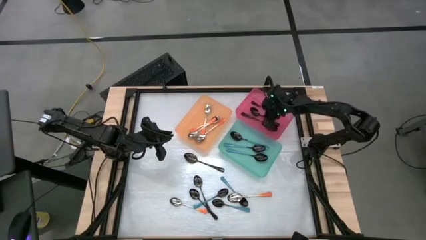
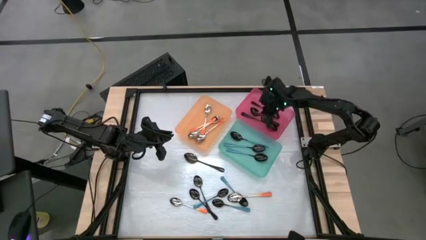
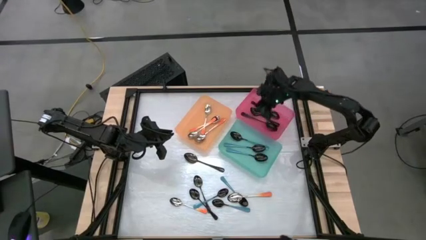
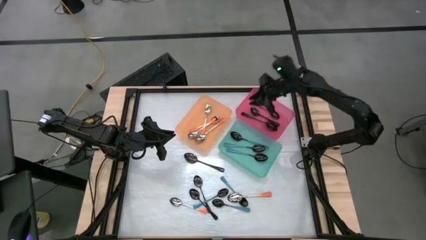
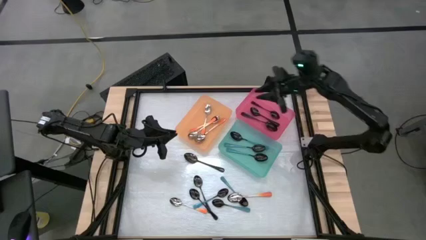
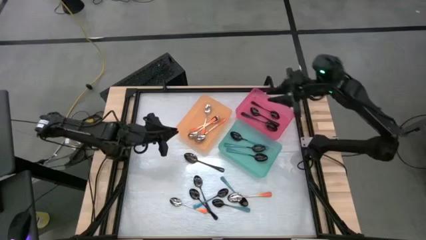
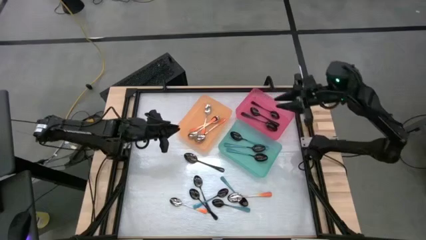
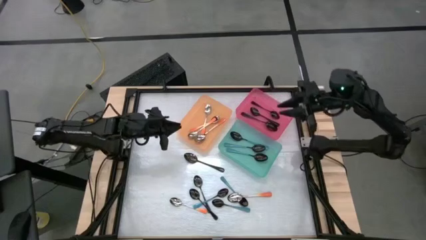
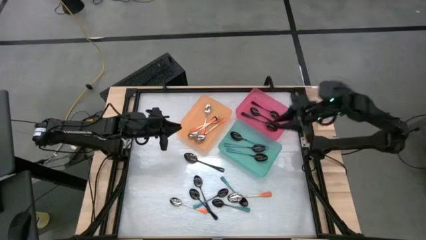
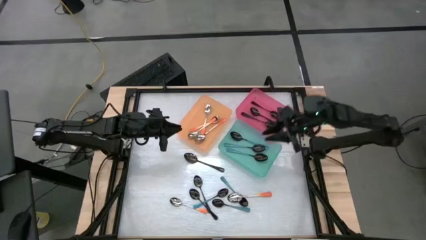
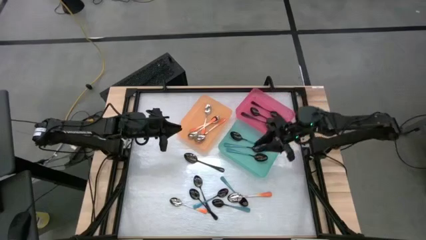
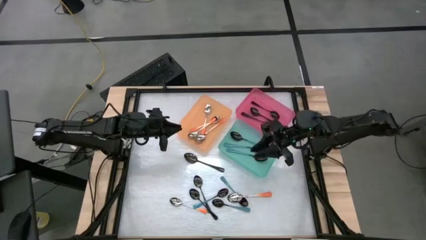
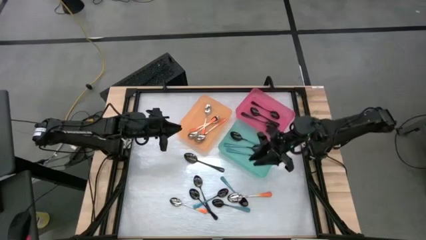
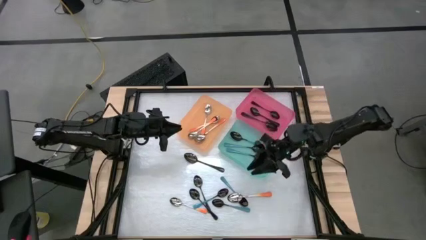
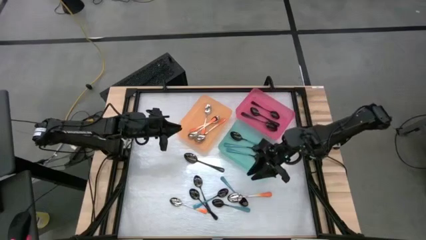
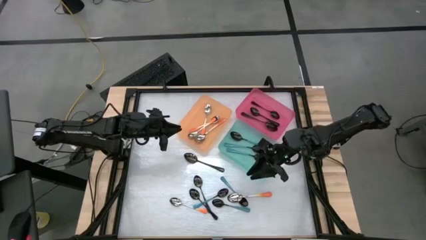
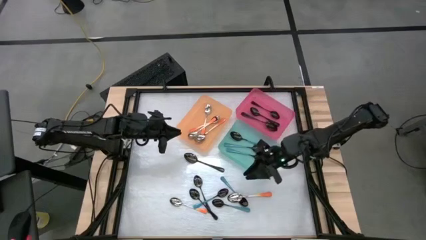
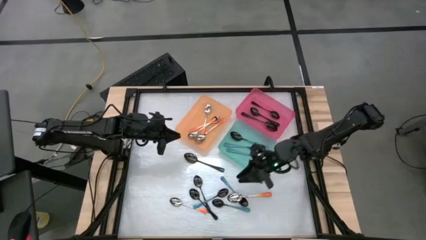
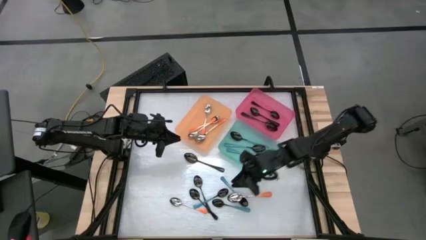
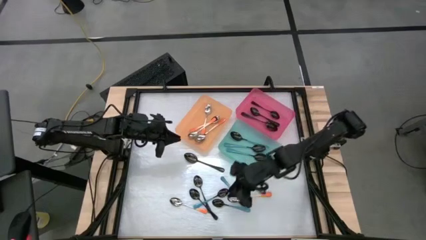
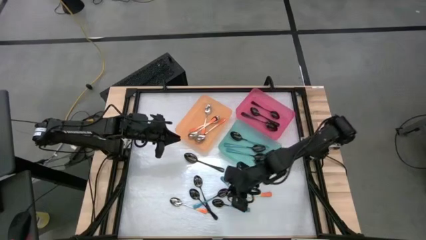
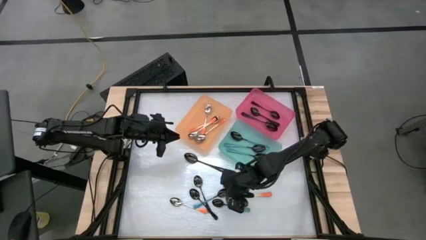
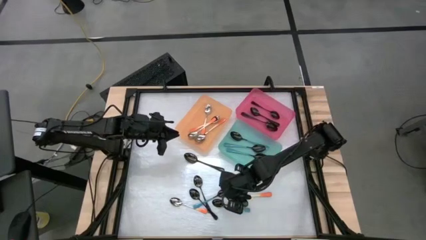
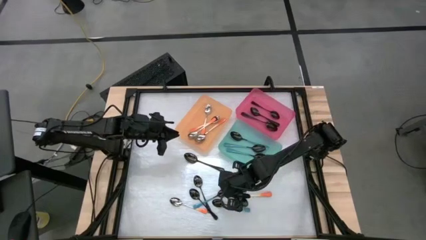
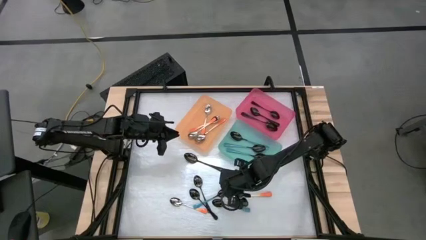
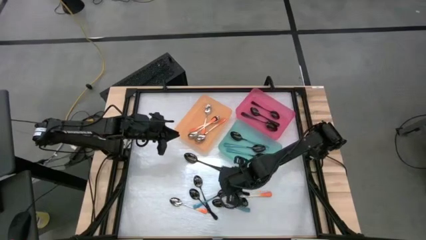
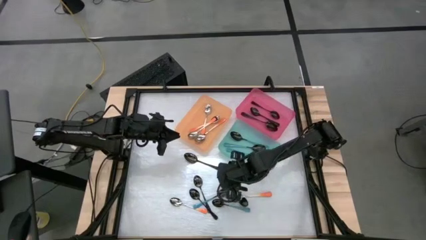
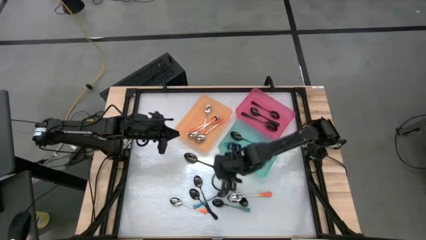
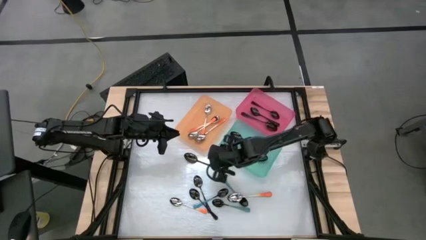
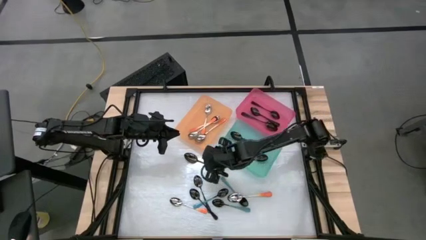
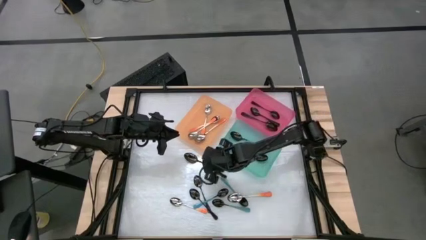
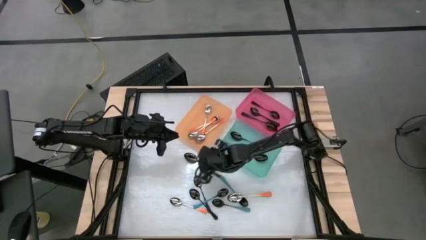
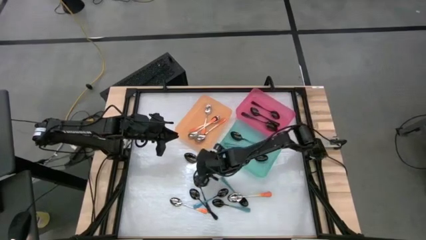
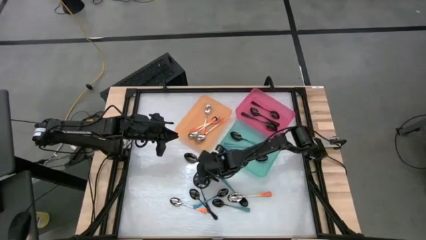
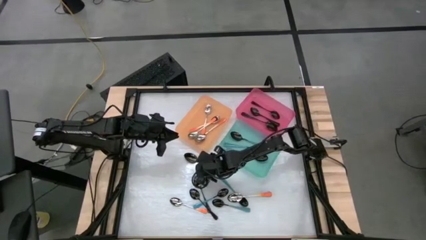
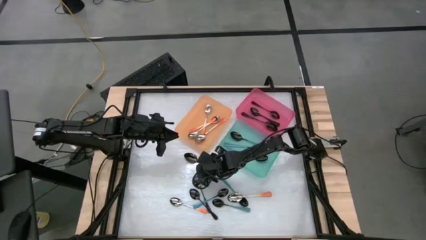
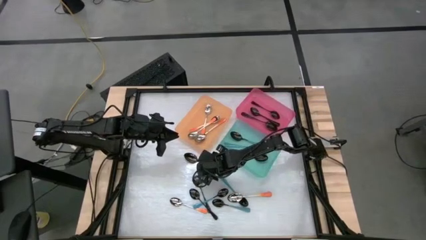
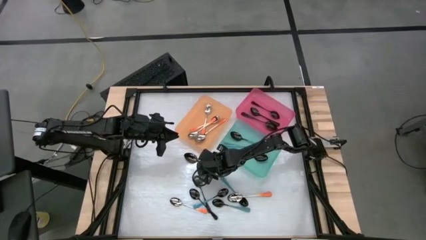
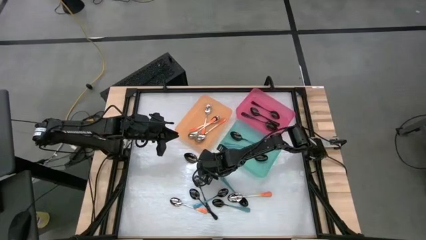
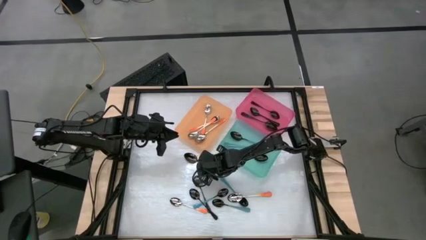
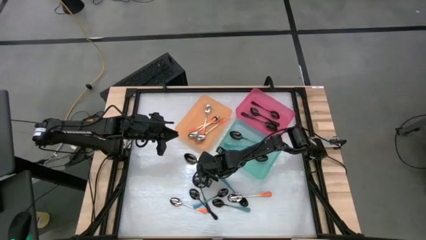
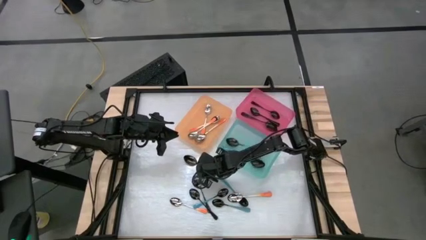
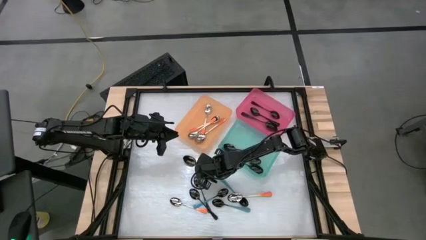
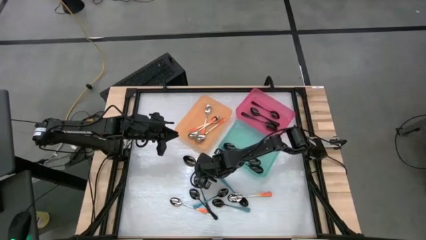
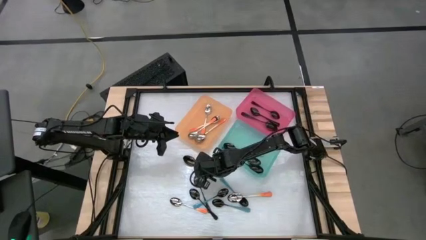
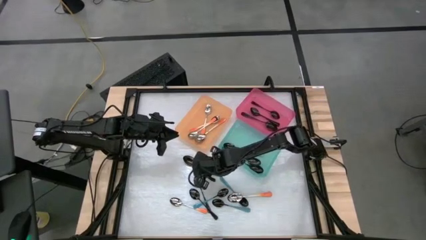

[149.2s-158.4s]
Task: Sort silverware by color (type)
Put the black spoon into the pink bin

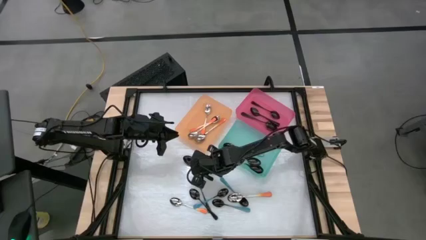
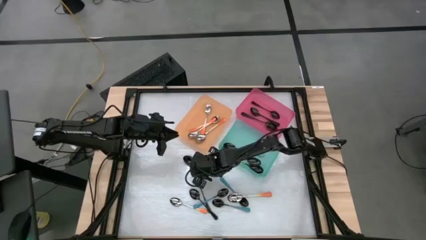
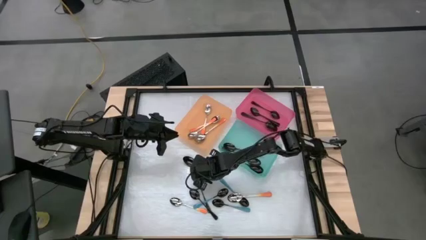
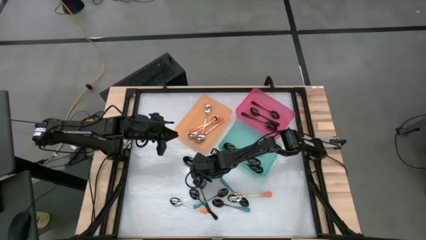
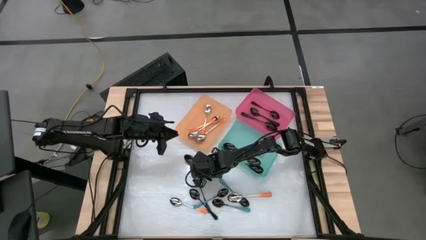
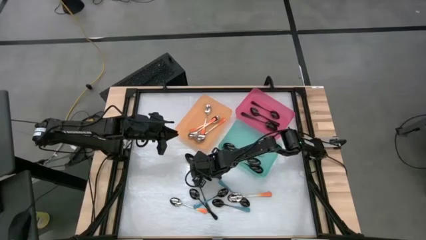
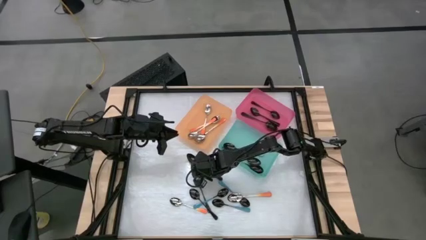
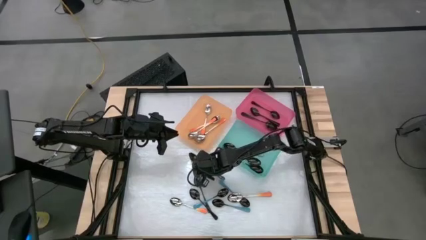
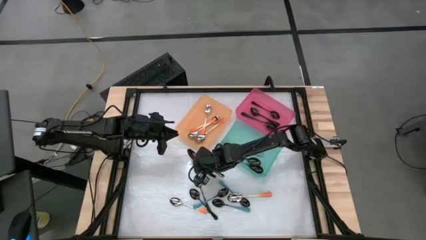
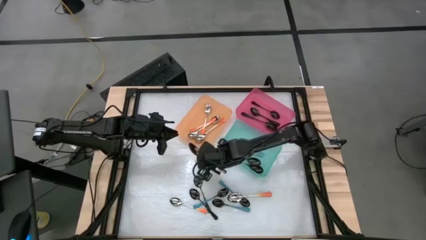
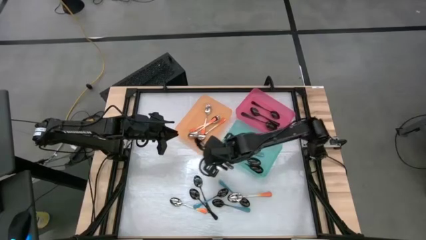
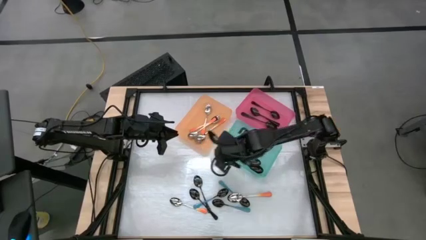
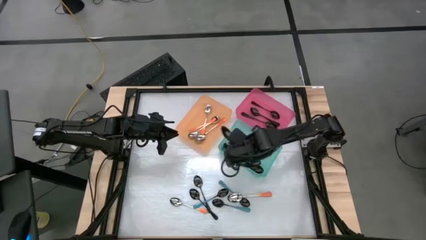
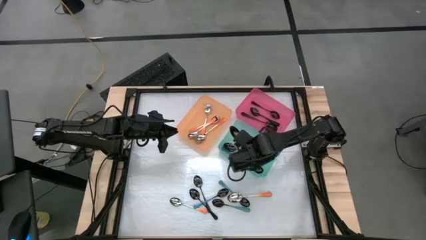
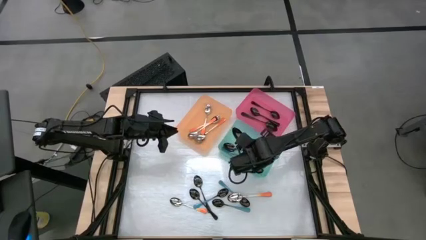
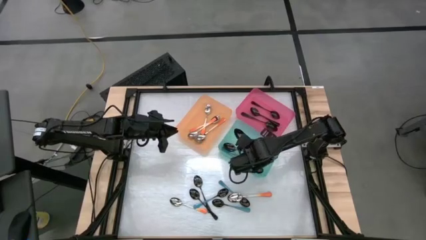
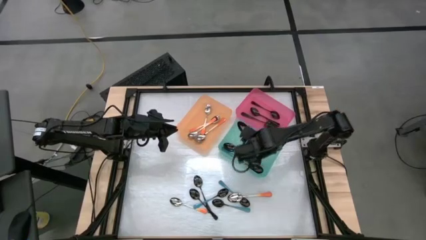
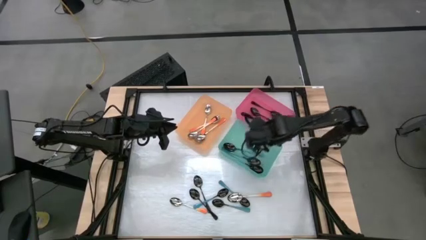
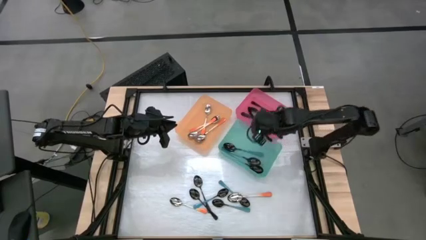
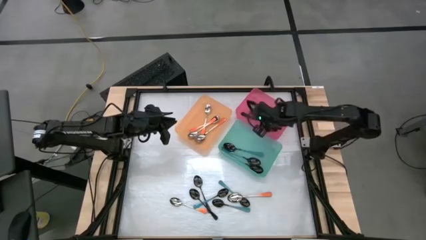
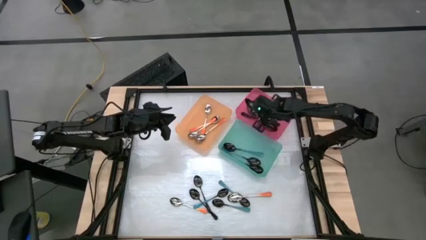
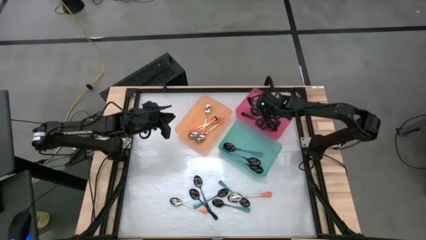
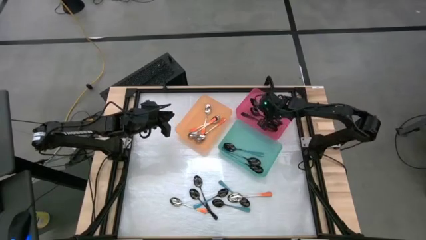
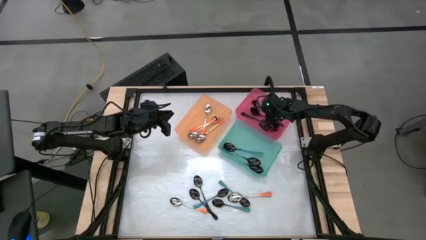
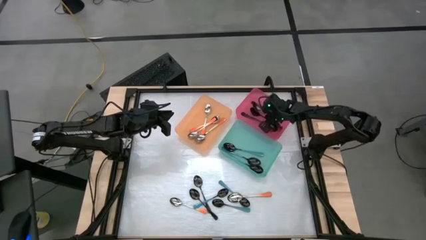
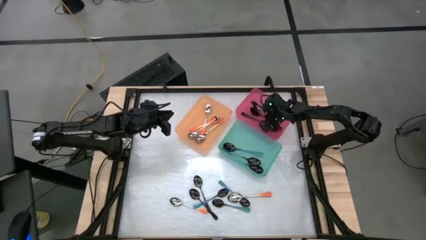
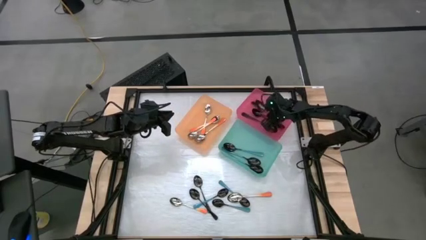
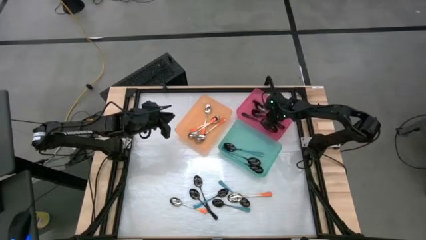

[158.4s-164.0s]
Put the black spoon into the pink bin
